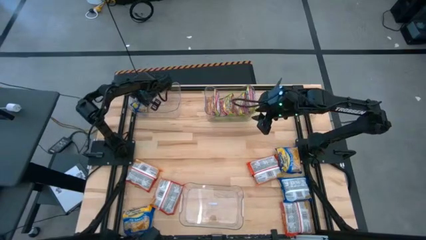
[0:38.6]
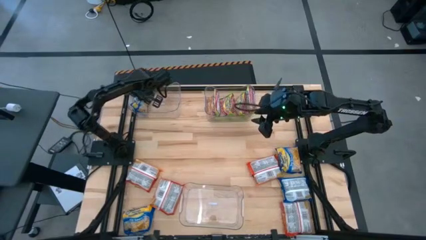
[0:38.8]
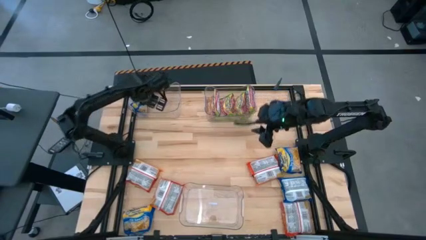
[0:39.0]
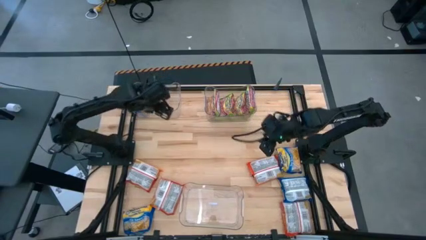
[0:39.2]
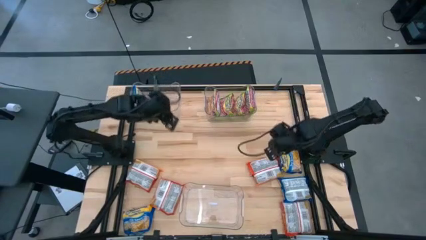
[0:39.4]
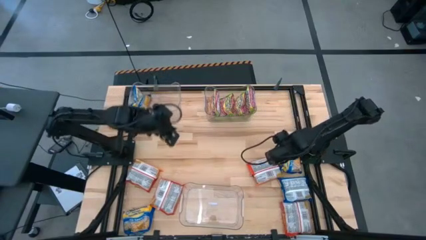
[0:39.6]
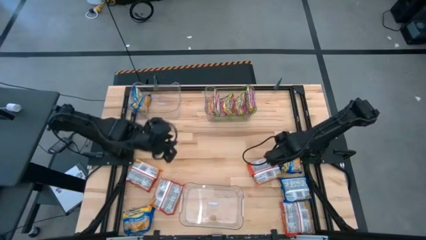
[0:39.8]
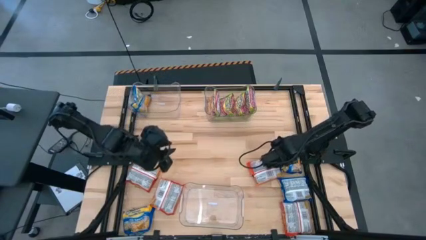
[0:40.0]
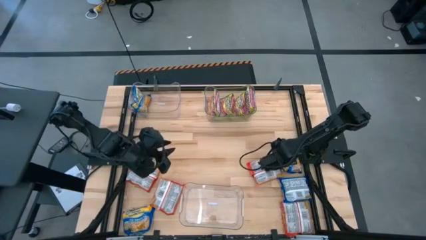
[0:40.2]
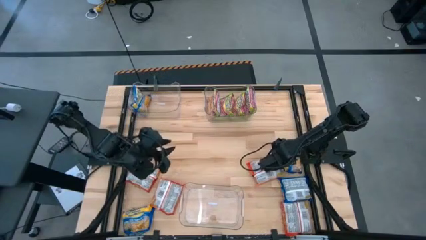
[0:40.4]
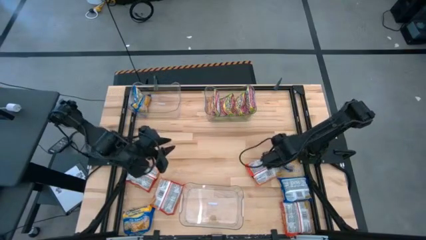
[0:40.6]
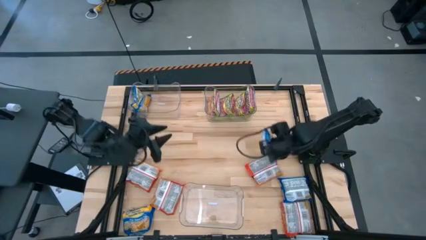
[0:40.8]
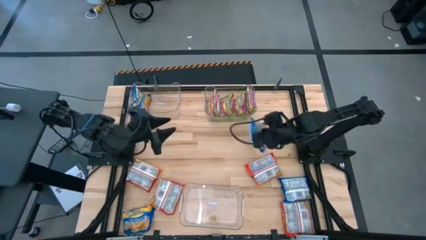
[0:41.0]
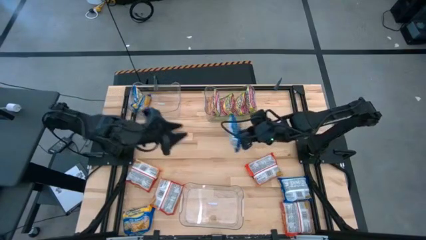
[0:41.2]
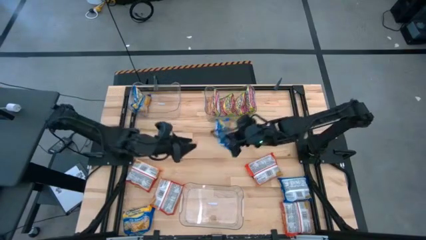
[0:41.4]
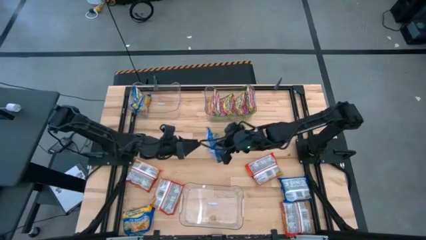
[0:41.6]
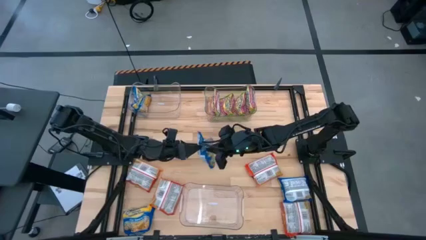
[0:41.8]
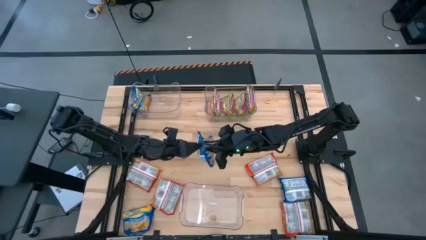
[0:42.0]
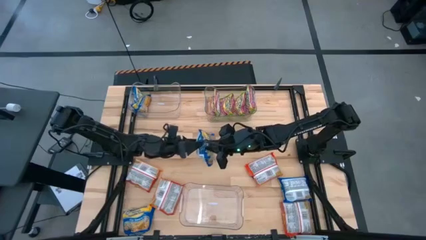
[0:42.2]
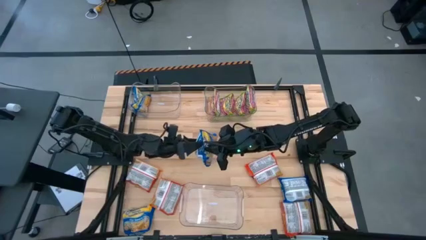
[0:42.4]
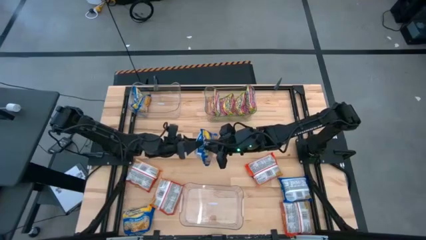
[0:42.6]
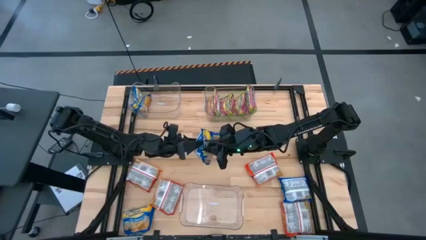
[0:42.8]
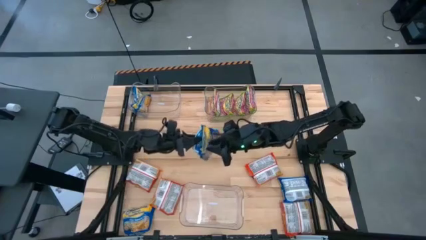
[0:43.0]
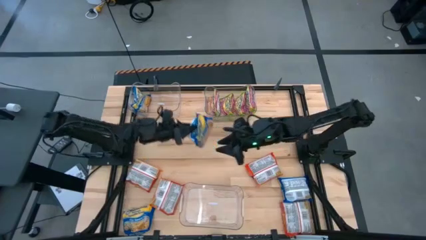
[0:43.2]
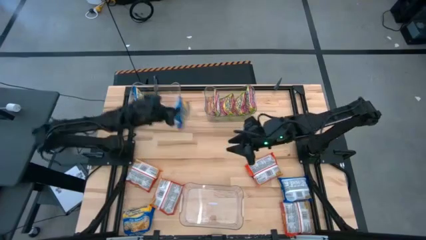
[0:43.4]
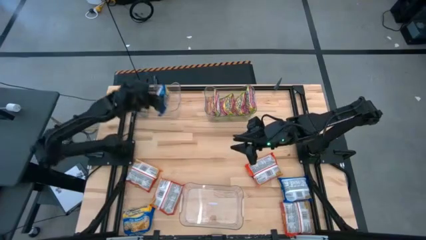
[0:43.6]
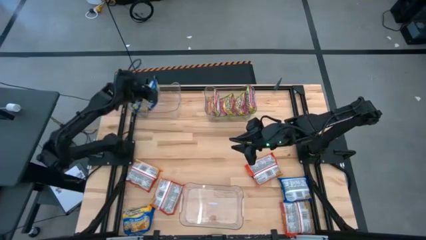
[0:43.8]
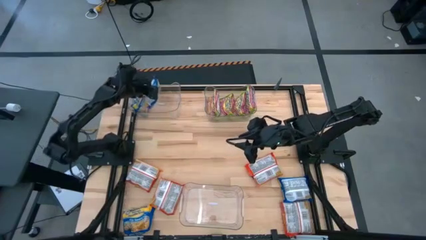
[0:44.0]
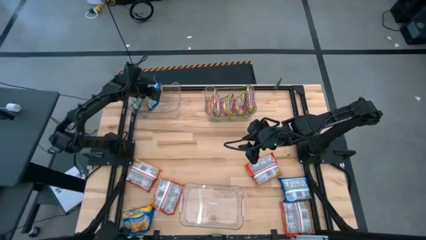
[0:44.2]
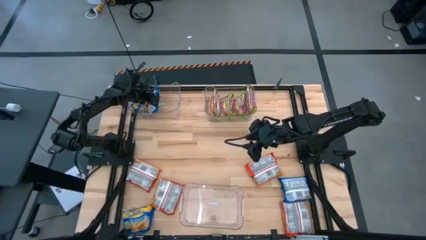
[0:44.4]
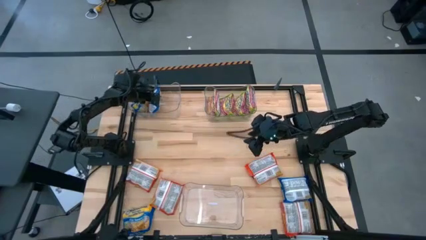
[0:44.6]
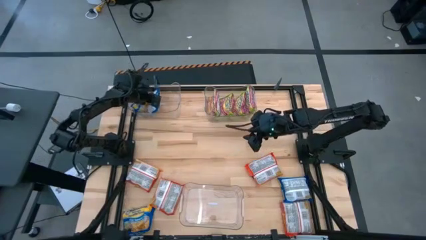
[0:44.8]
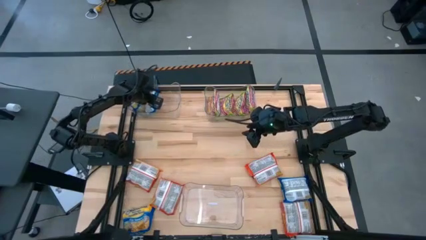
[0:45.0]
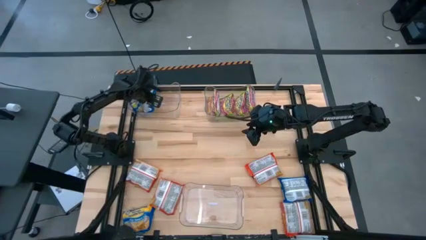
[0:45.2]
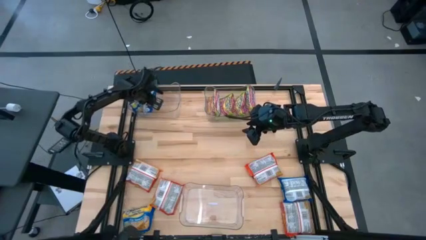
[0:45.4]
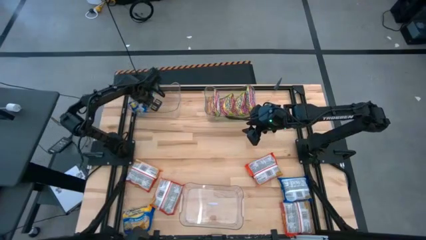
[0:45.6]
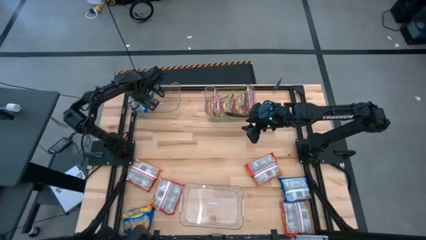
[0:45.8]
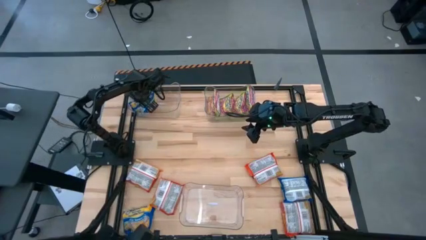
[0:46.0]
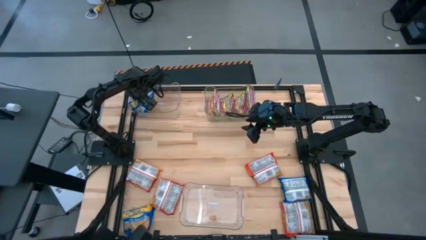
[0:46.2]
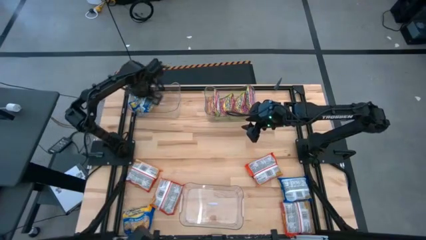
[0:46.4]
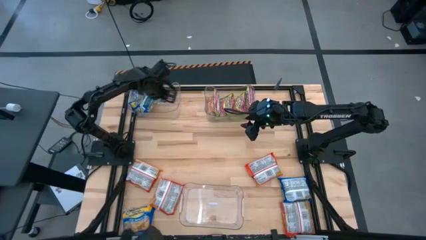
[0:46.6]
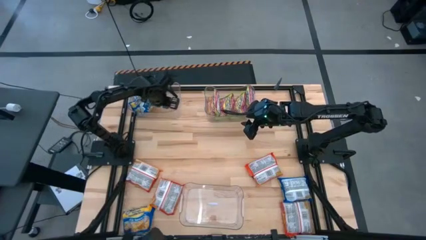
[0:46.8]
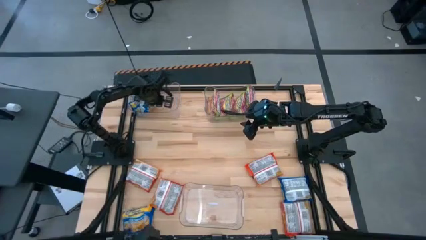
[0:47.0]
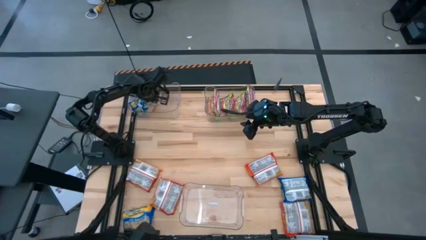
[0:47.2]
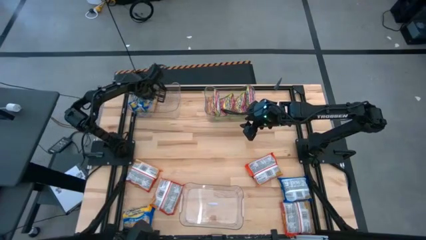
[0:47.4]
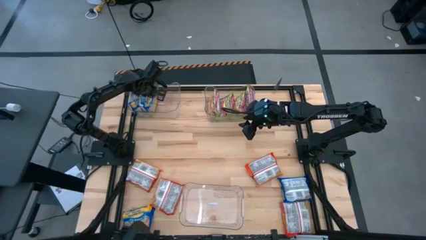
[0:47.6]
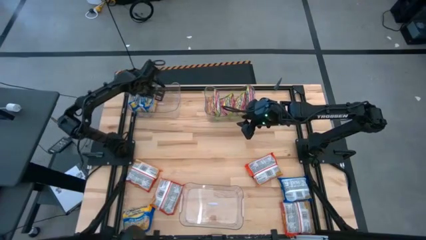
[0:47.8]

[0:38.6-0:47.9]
Task: Sort Maruchan noodles
Put the blue noodle pack into the top left transparent bin

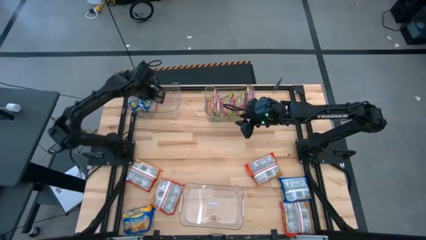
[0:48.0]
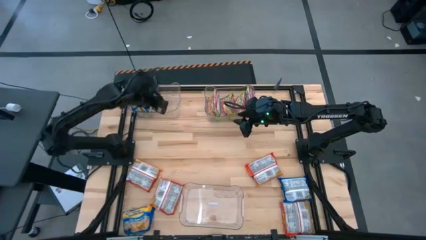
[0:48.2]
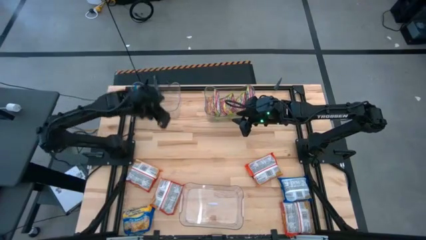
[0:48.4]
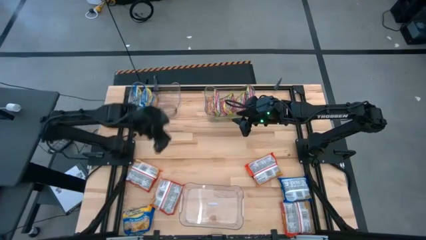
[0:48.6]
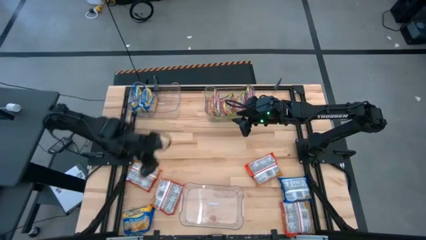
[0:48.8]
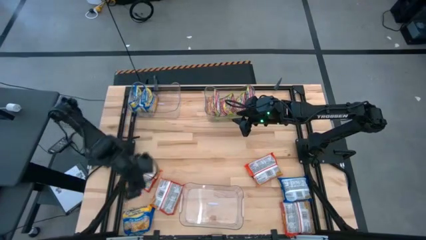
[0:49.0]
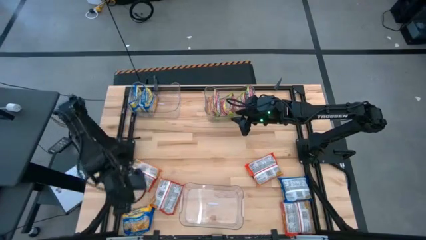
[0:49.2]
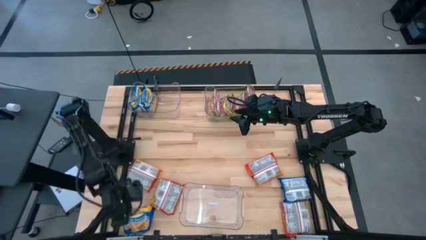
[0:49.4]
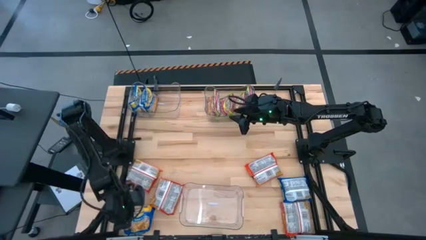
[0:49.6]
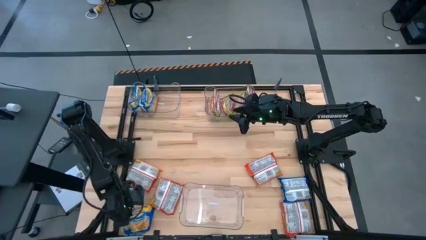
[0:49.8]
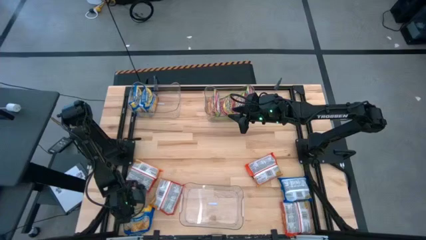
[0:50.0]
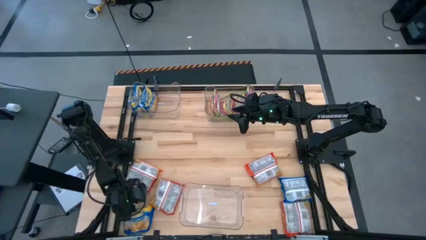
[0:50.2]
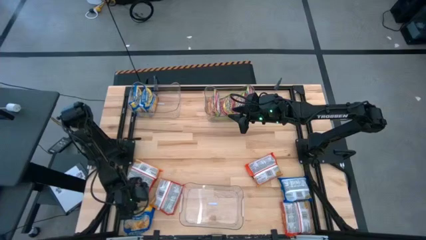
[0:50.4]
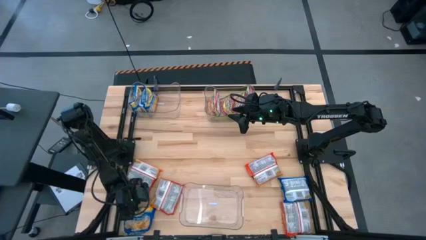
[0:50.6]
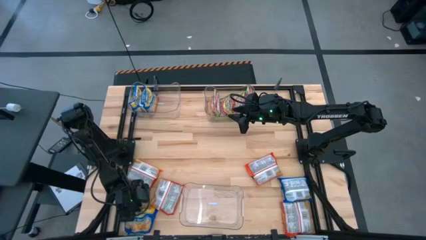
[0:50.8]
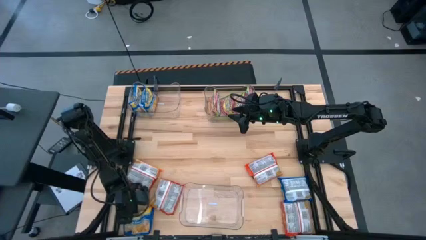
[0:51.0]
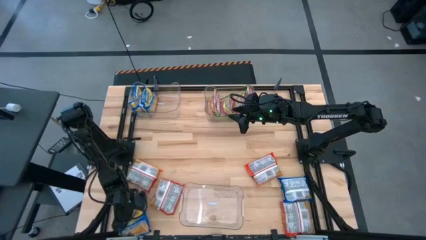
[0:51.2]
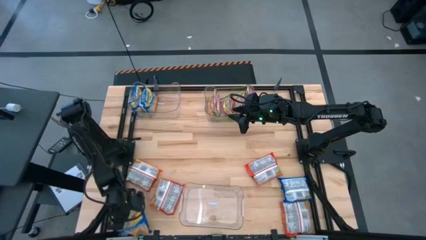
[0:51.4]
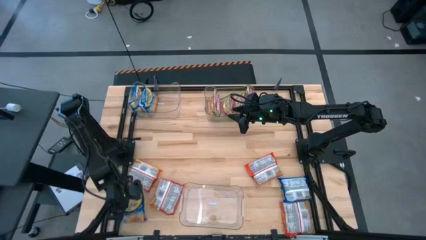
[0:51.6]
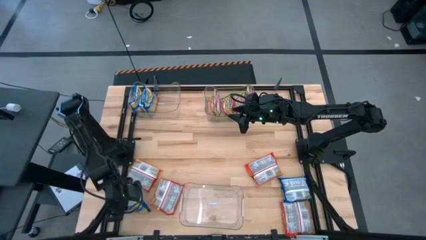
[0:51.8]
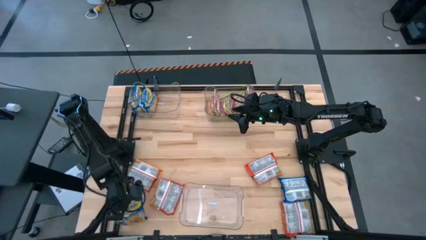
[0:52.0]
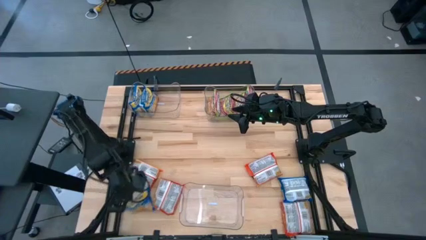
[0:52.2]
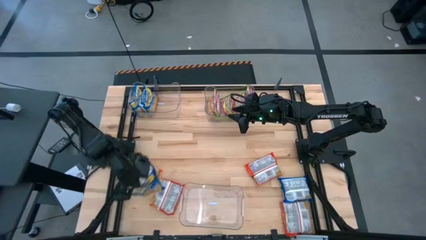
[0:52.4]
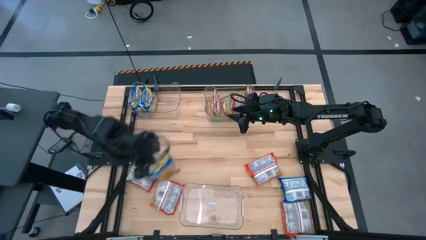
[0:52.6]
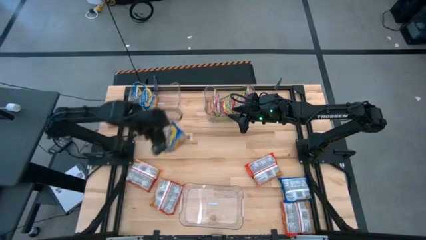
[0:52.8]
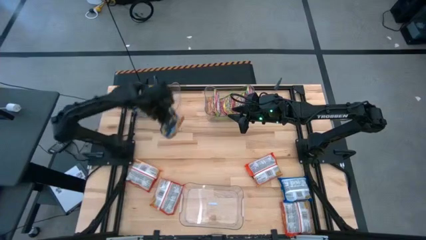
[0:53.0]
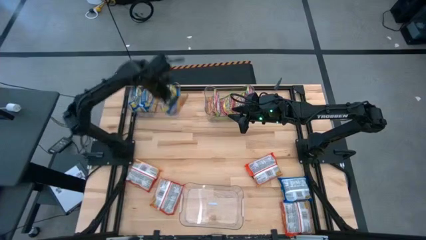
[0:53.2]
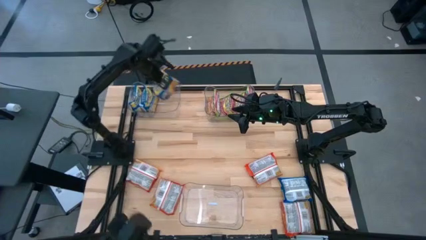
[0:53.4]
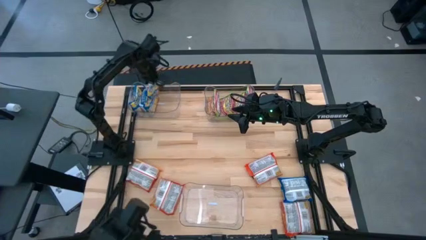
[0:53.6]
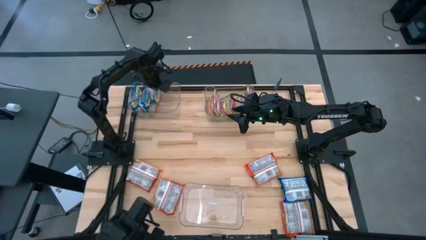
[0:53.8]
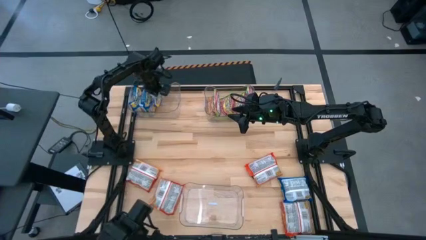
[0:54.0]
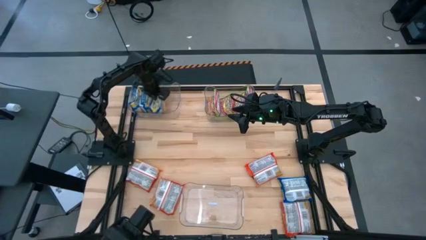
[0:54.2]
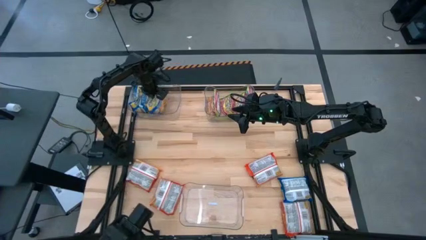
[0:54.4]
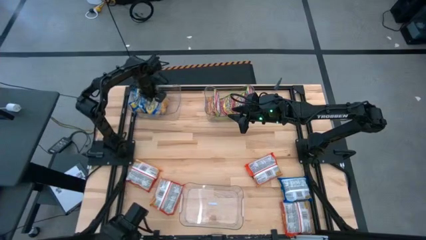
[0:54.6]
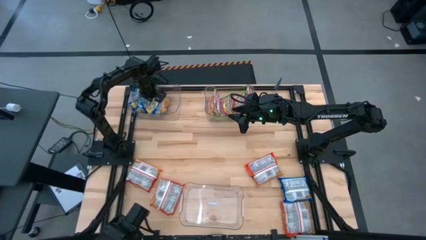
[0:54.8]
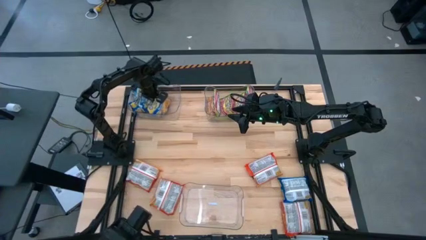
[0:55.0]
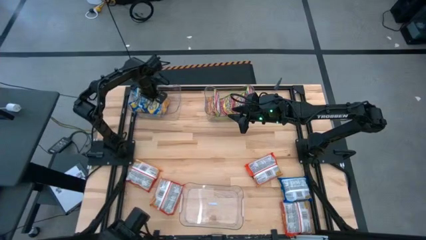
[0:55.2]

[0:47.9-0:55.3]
Put the blue noodle pack into the top left transparent bin
